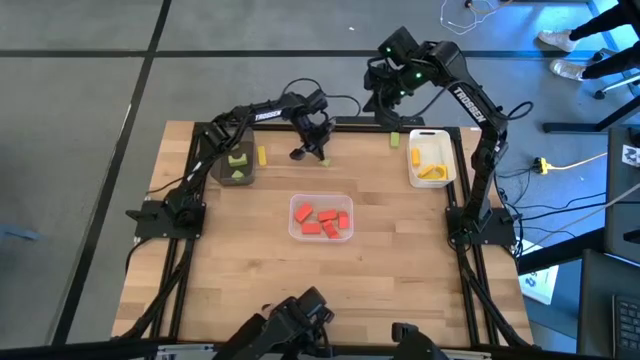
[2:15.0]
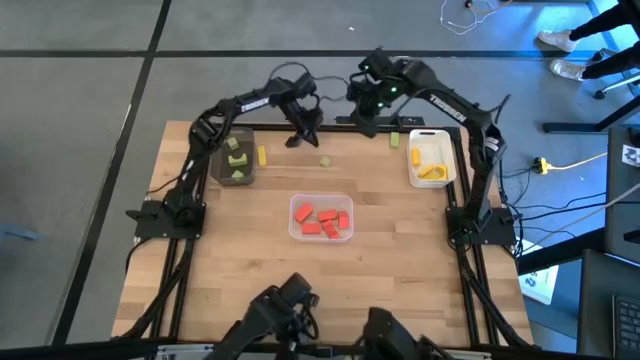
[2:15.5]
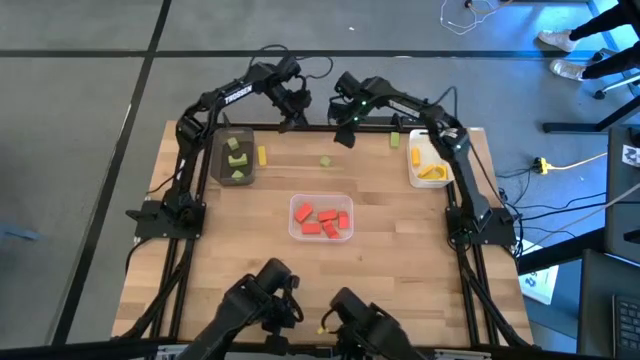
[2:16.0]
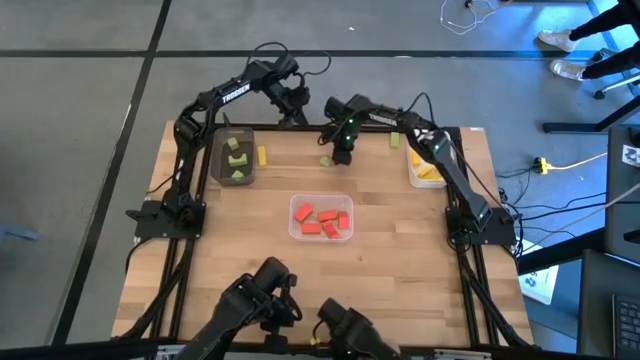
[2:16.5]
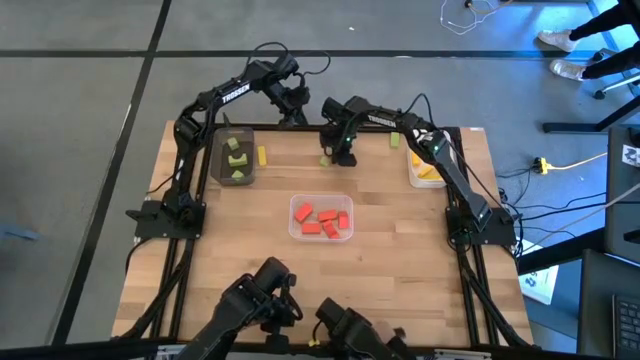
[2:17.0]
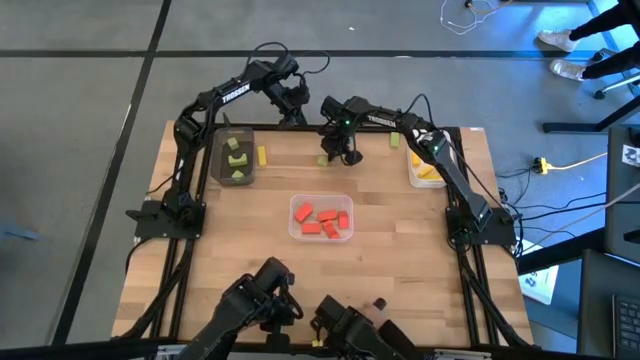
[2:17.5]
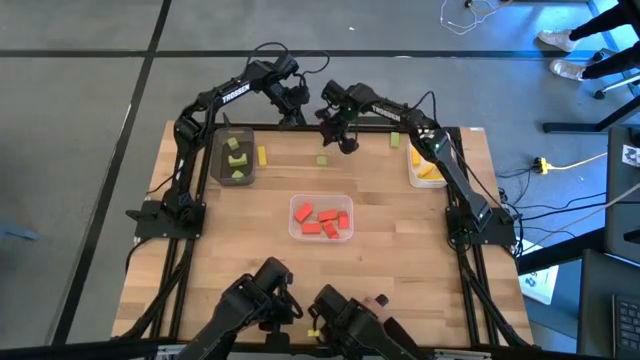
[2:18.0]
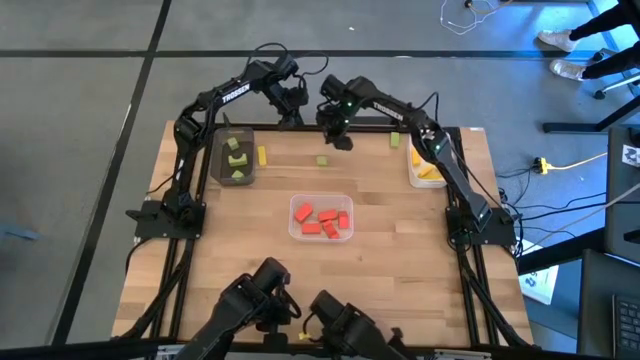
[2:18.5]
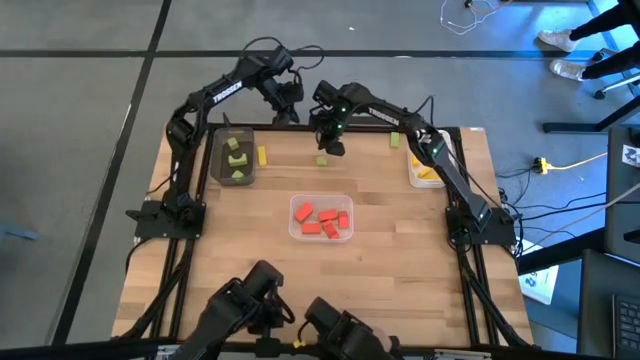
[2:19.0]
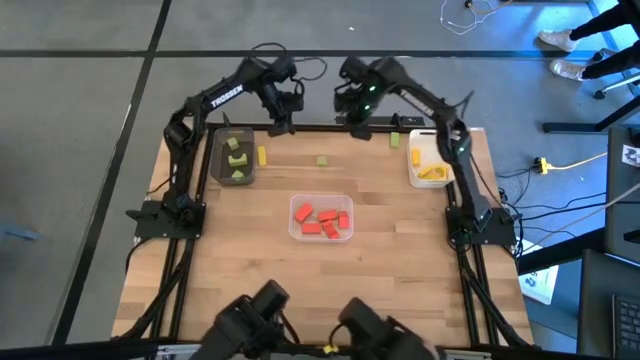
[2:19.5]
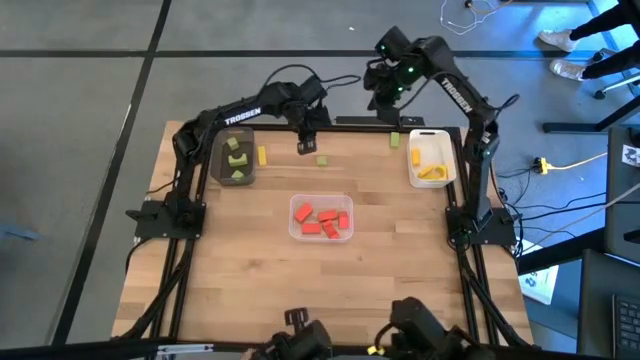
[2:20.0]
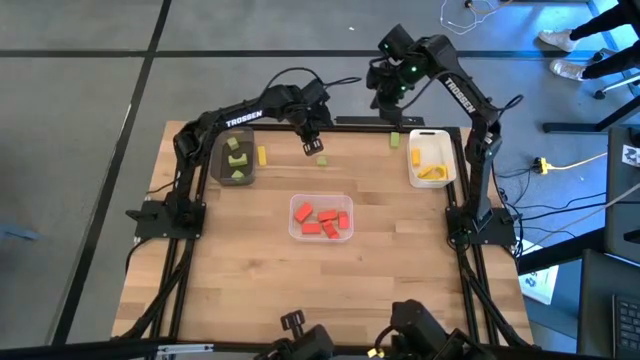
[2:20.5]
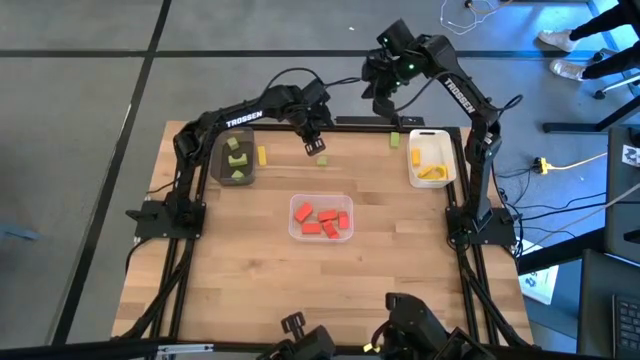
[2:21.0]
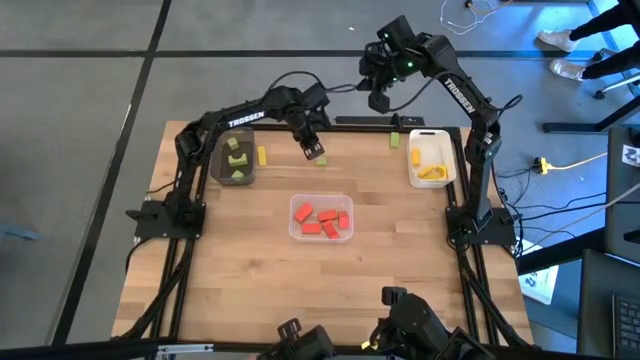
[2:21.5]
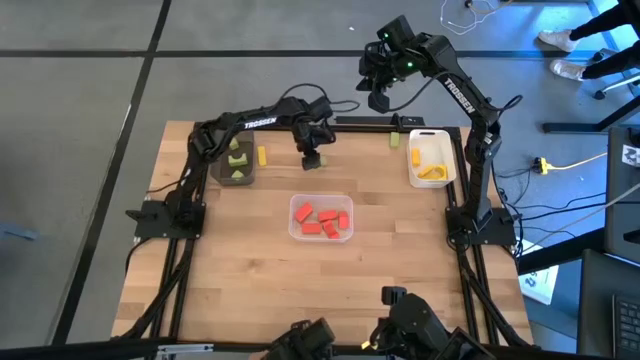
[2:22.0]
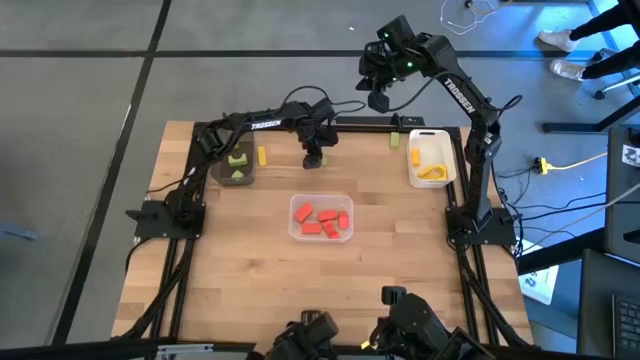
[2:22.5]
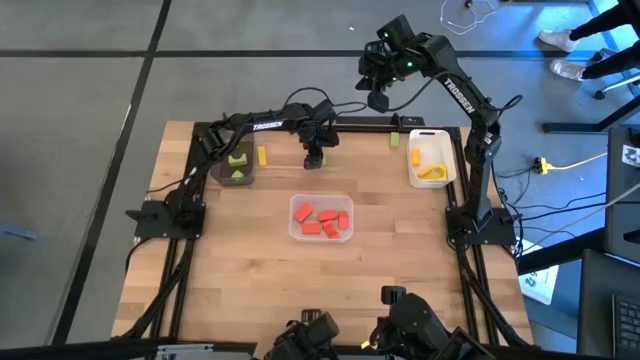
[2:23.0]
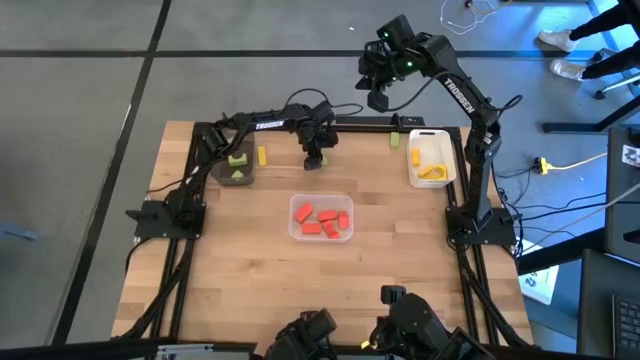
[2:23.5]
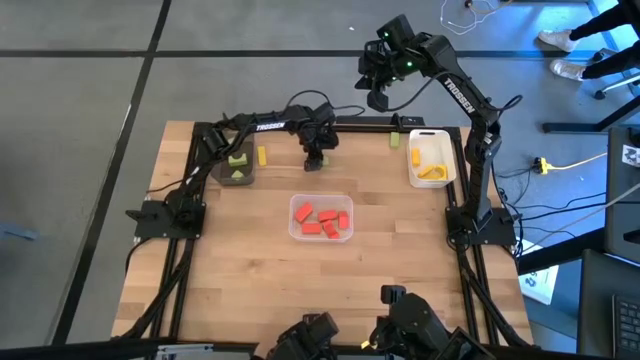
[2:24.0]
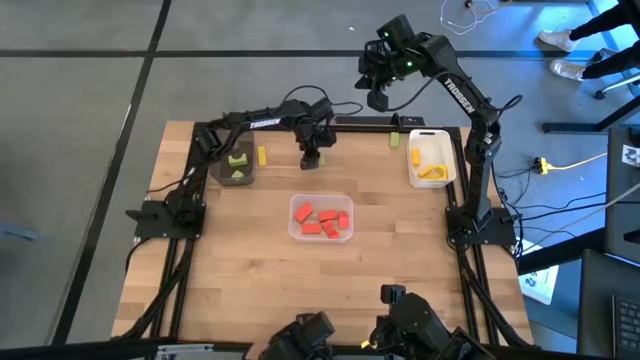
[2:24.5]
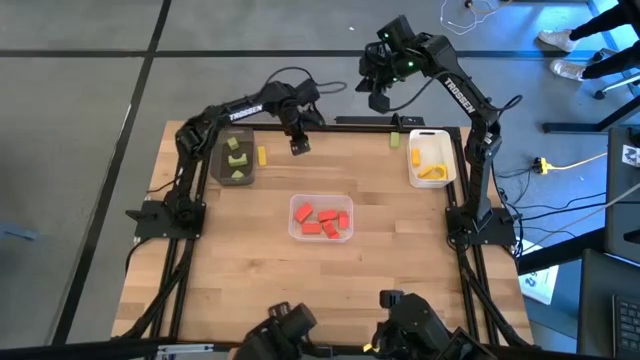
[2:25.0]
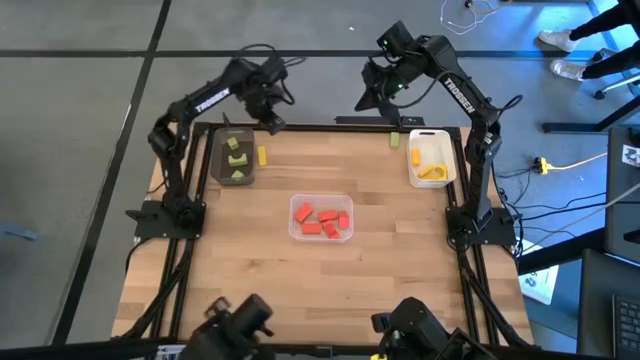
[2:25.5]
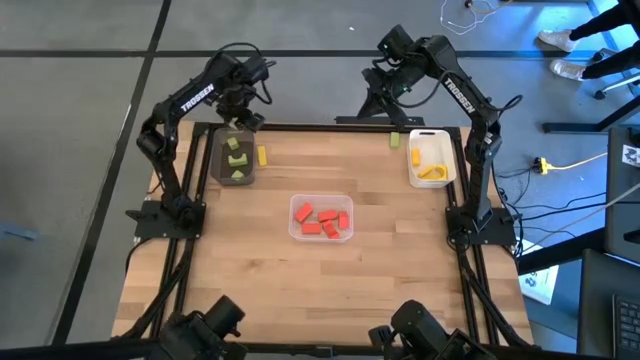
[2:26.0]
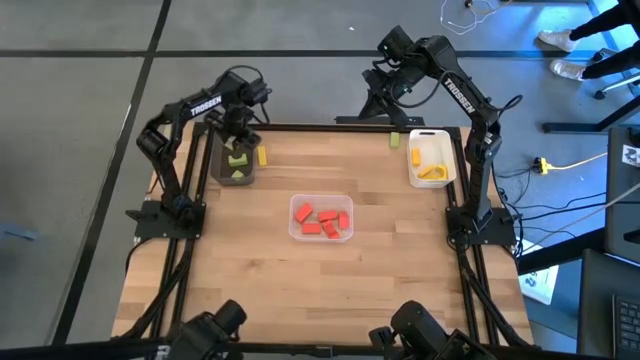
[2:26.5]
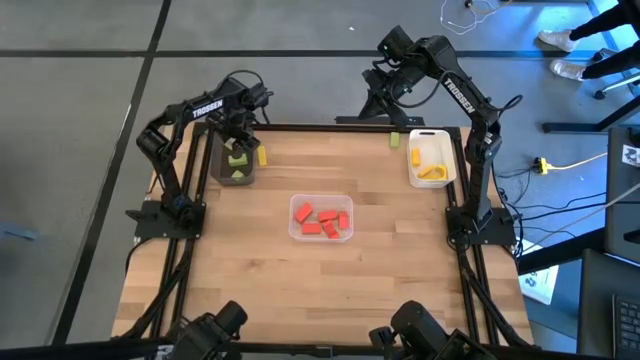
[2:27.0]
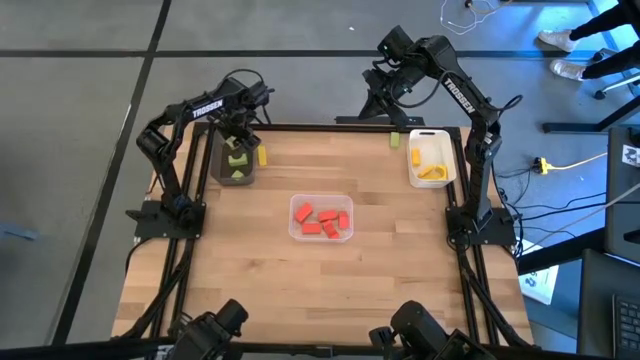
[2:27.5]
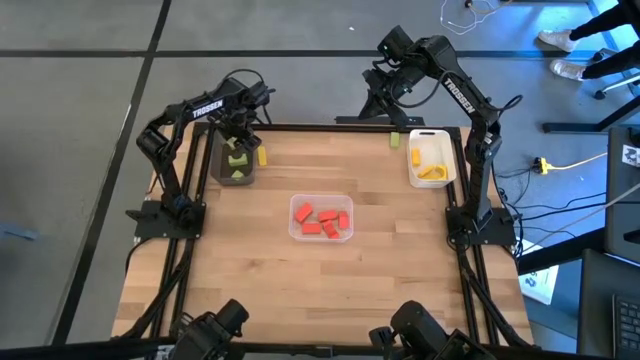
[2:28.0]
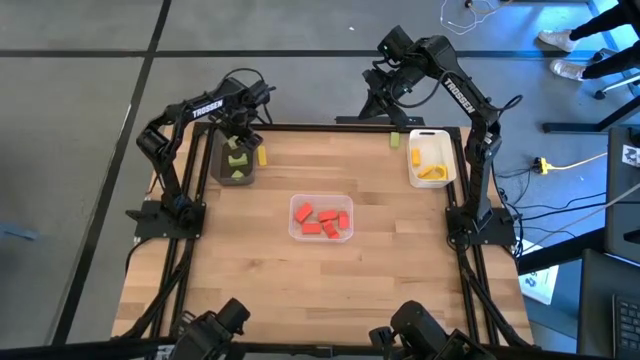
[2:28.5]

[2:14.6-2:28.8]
Task: Sort & place blocks by color
Put the green block into the black bin

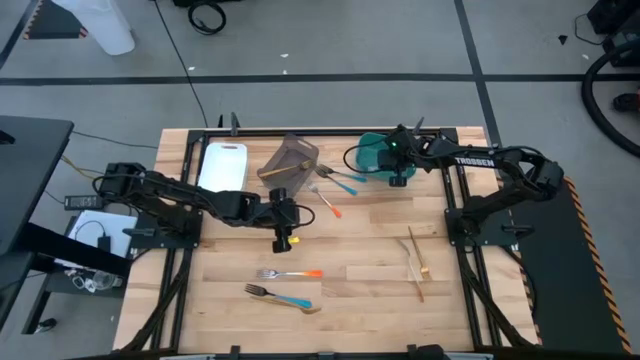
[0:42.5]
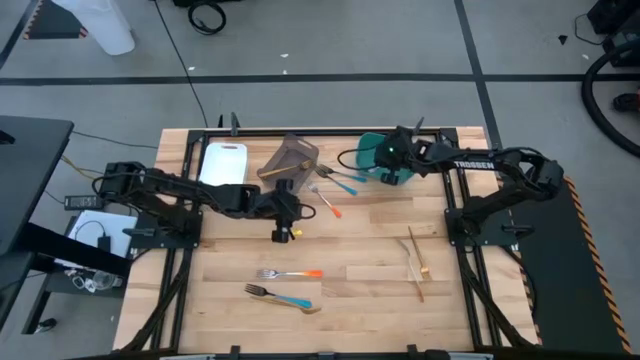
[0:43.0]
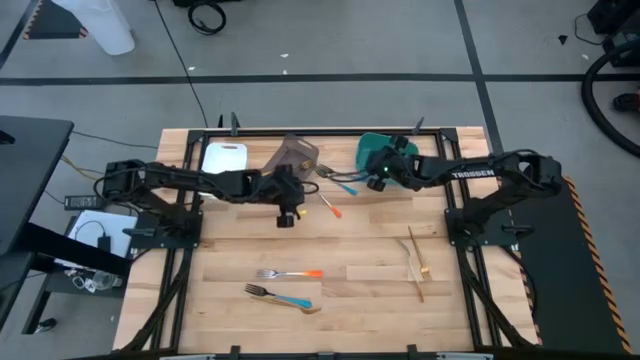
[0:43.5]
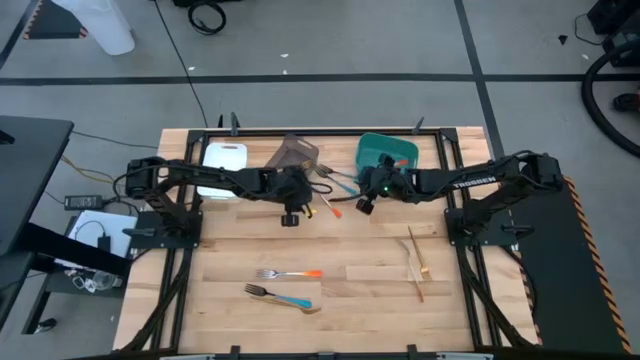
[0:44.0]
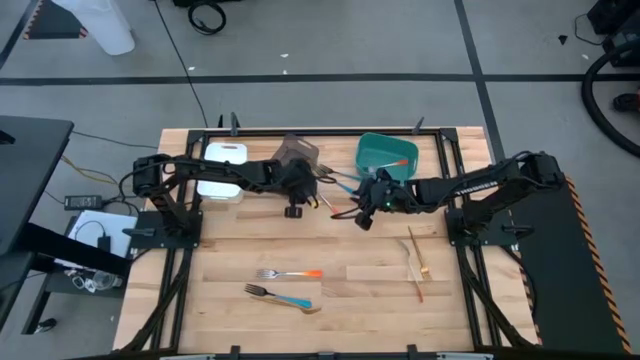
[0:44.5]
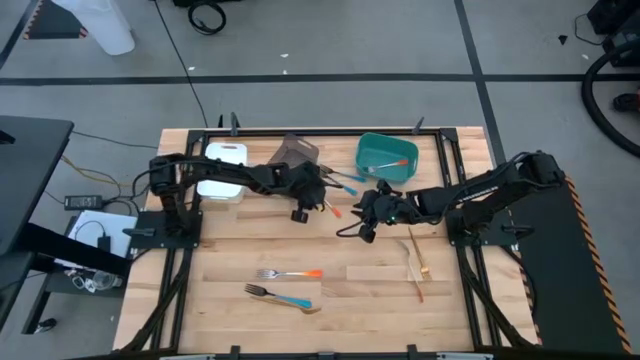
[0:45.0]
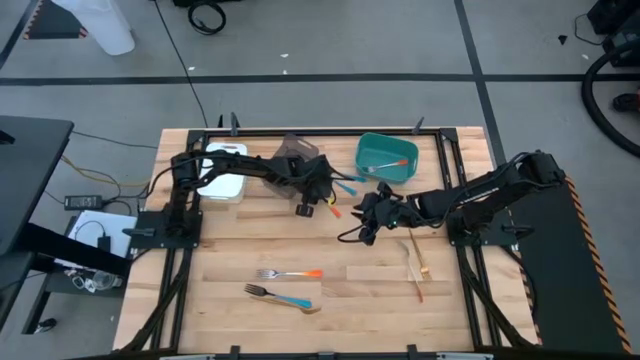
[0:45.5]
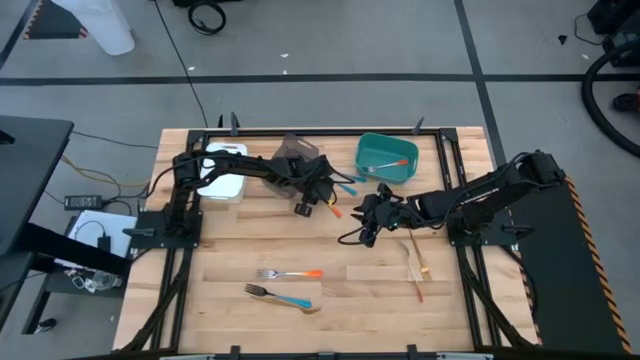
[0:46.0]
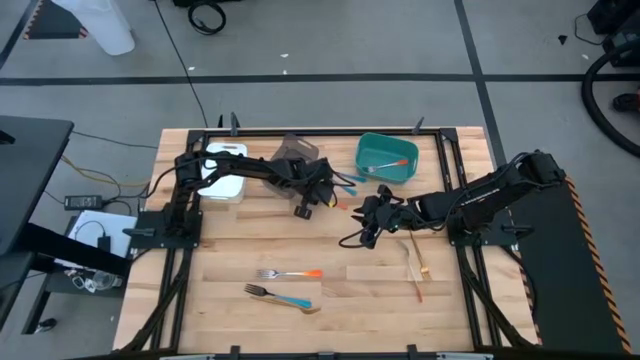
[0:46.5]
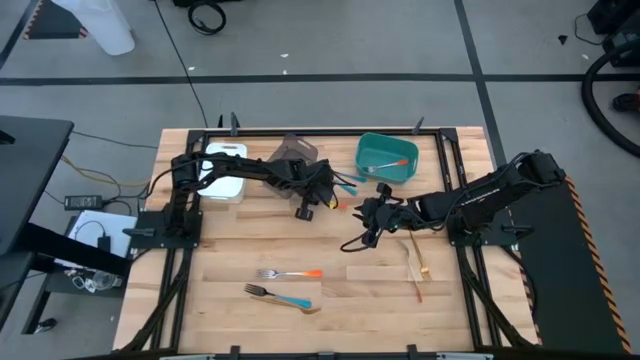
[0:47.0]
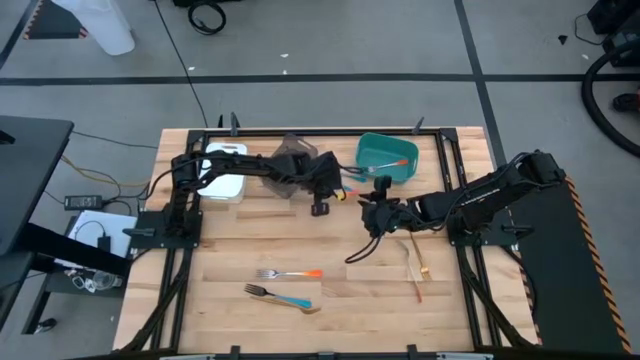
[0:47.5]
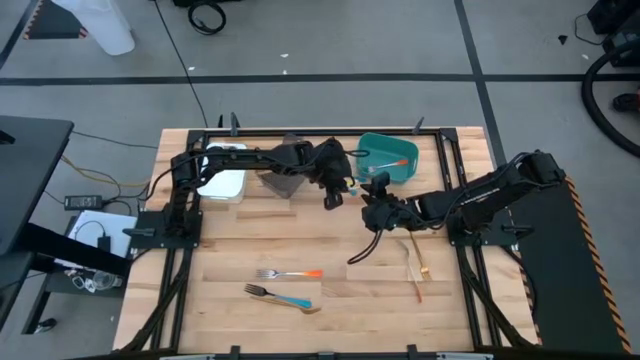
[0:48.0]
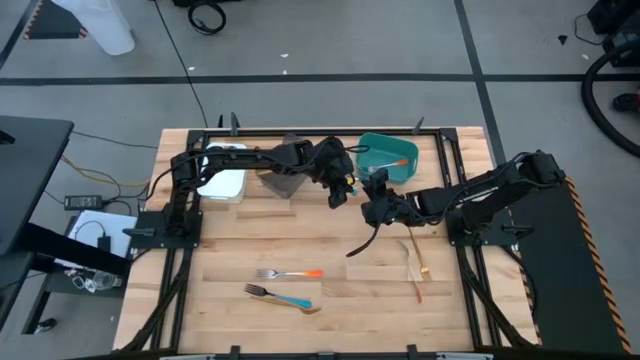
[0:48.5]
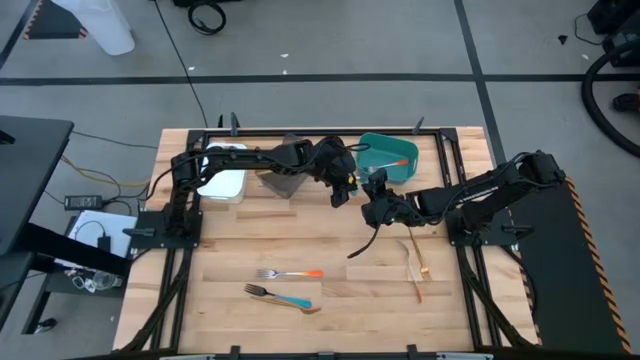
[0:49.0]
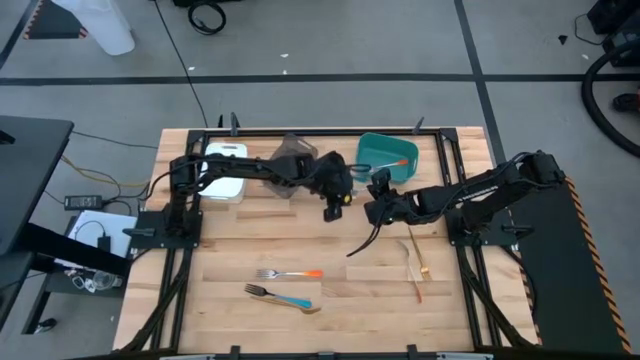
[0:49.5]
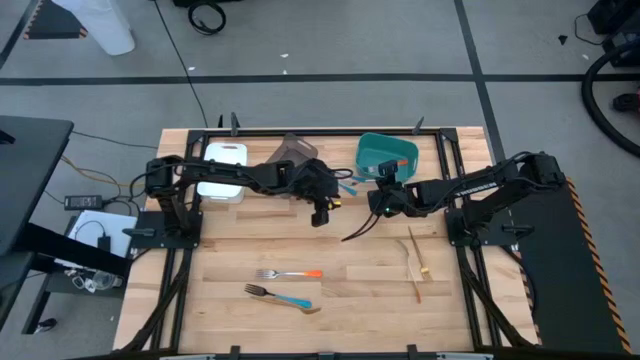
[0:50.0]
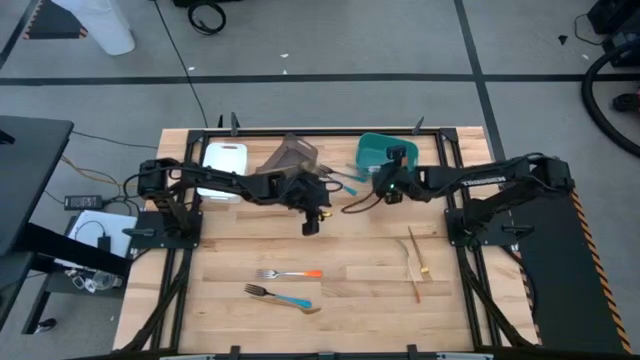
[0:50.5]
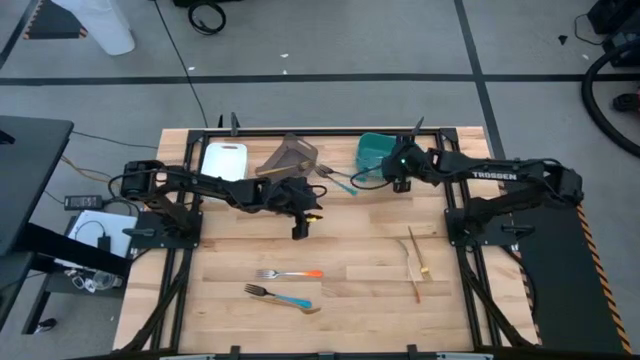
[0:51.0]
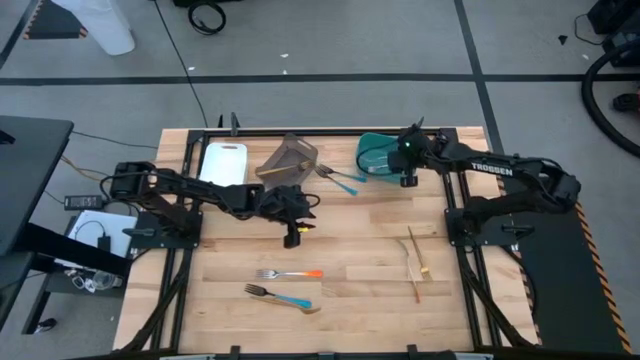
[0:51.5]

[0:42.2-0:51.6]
Task: Sort silverware by color (type)
Put the top orange fork into the green bin
